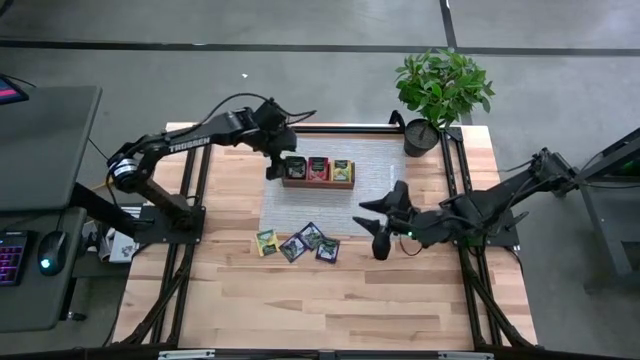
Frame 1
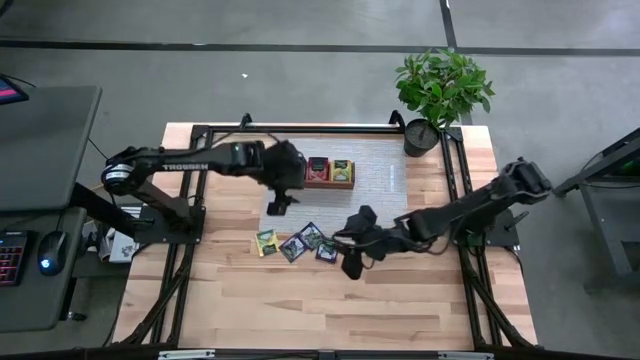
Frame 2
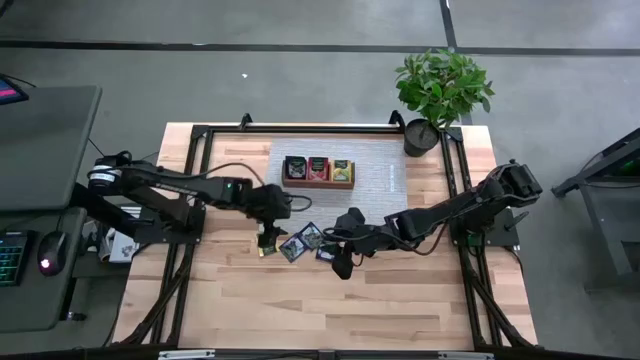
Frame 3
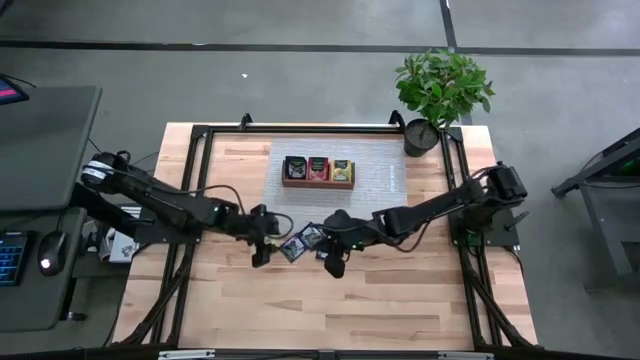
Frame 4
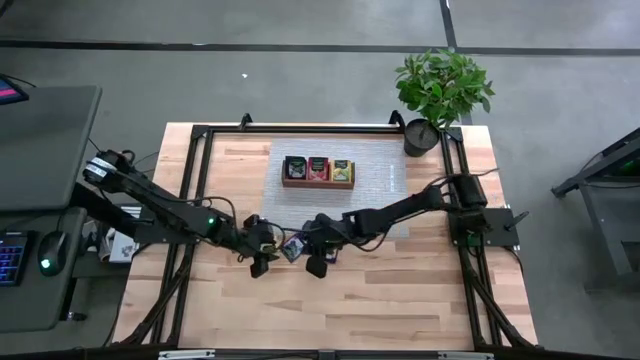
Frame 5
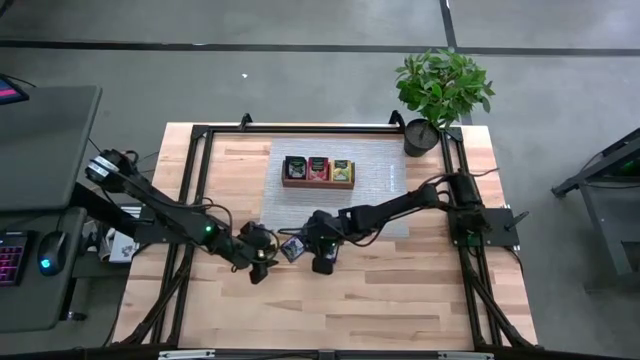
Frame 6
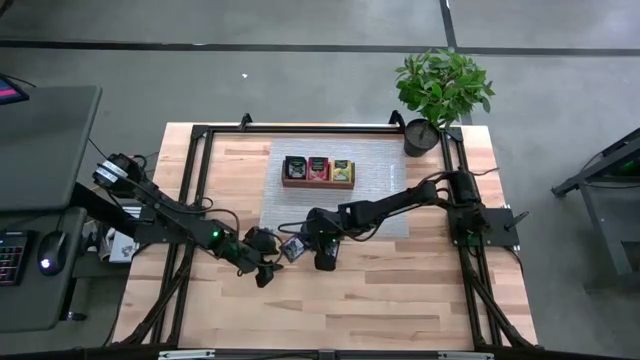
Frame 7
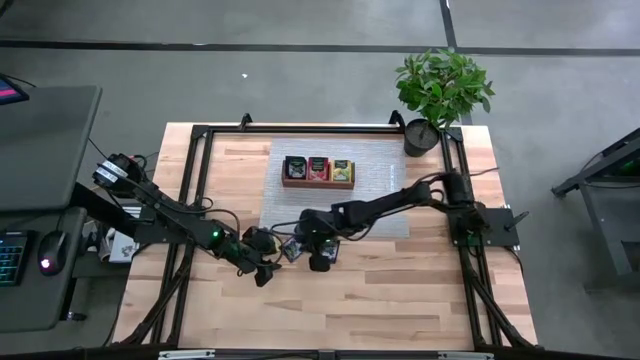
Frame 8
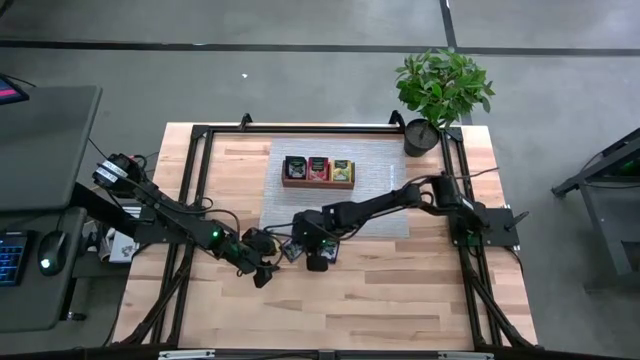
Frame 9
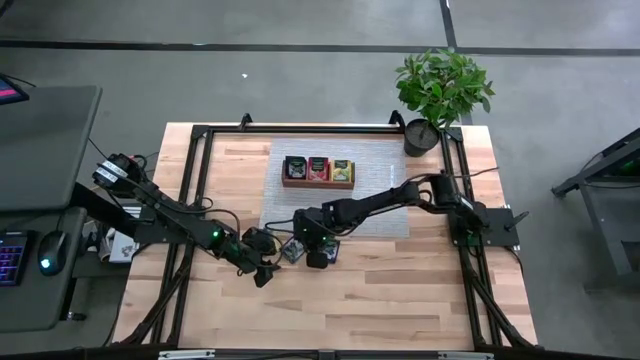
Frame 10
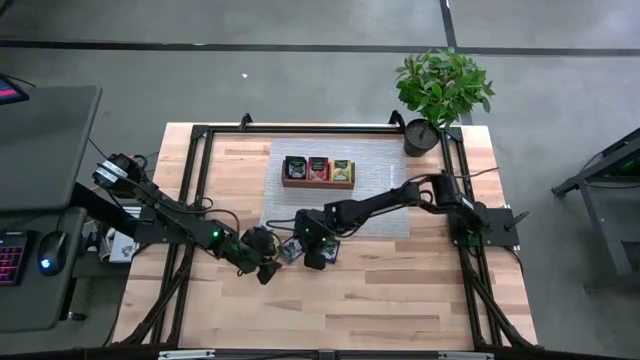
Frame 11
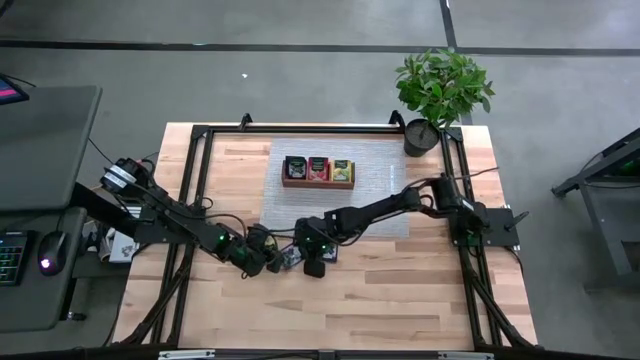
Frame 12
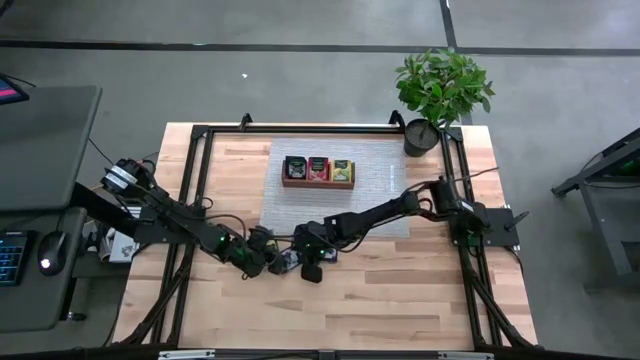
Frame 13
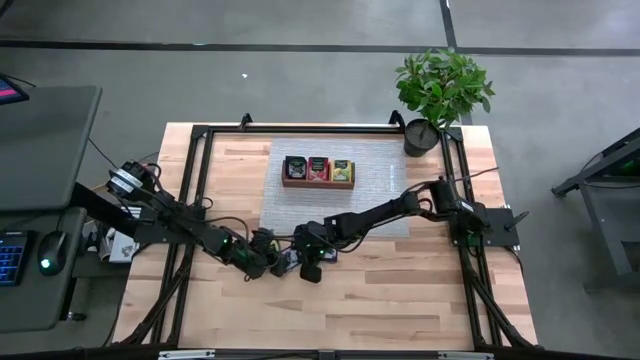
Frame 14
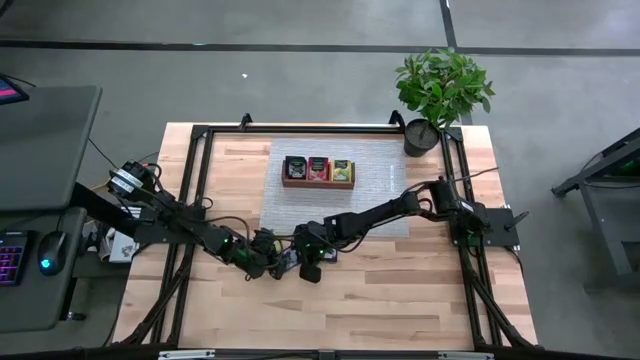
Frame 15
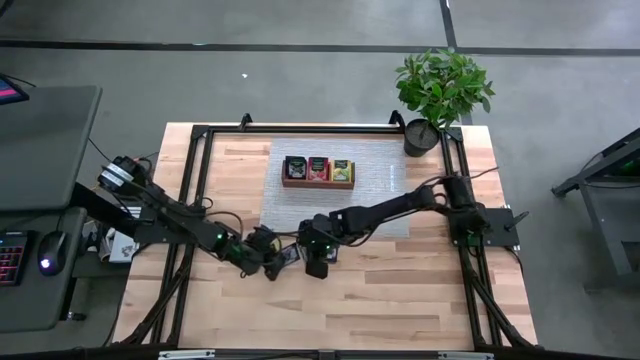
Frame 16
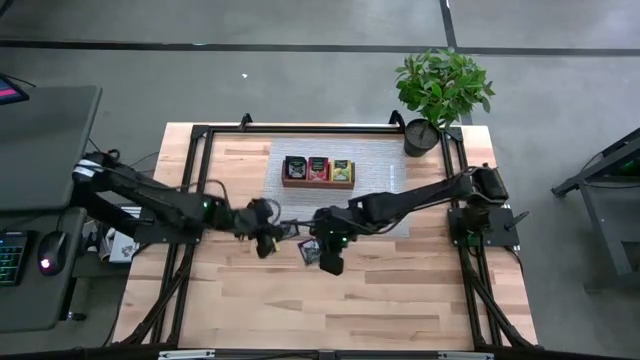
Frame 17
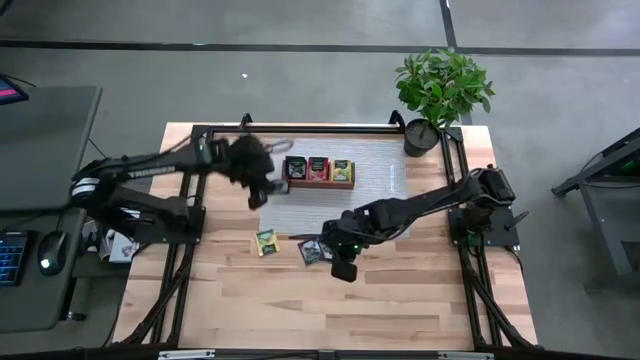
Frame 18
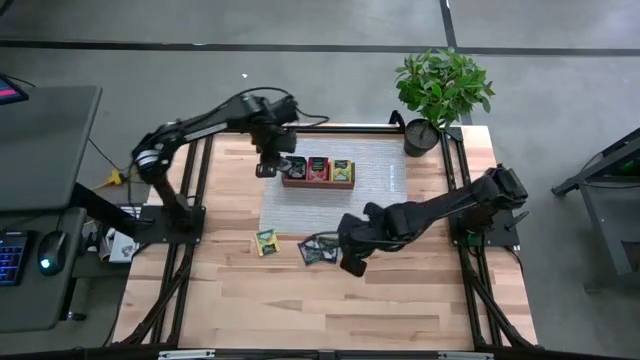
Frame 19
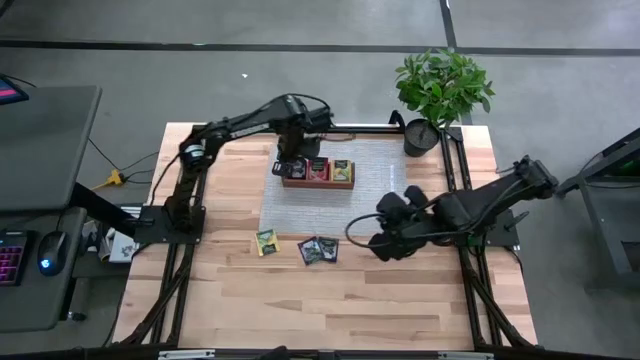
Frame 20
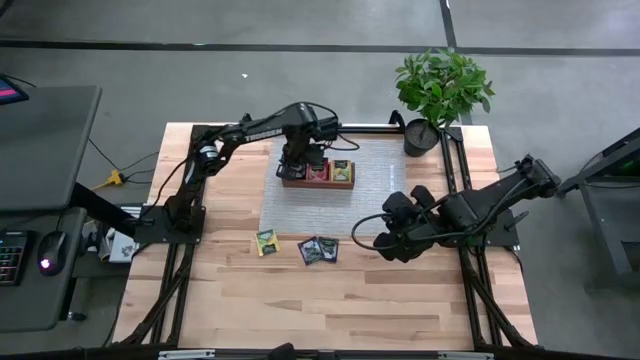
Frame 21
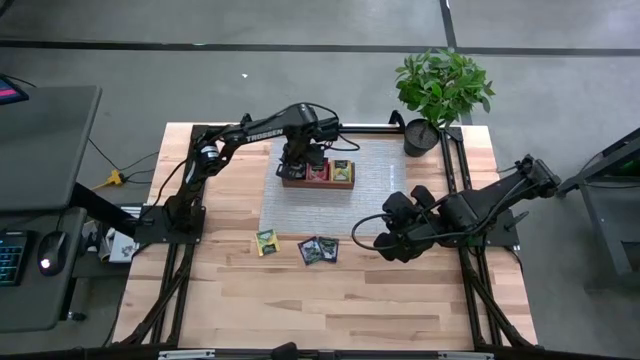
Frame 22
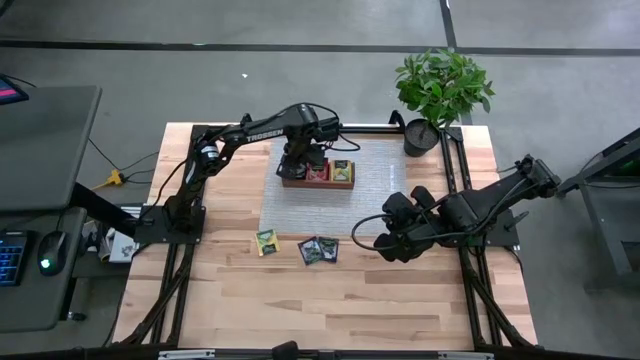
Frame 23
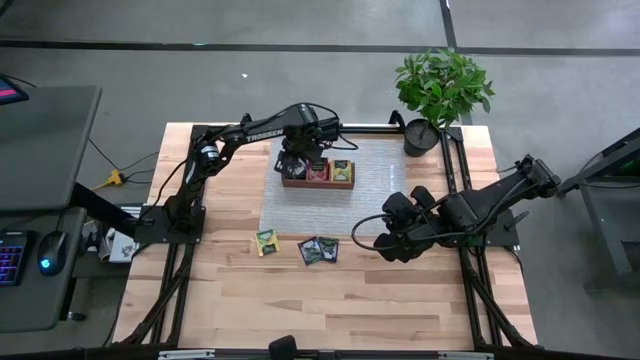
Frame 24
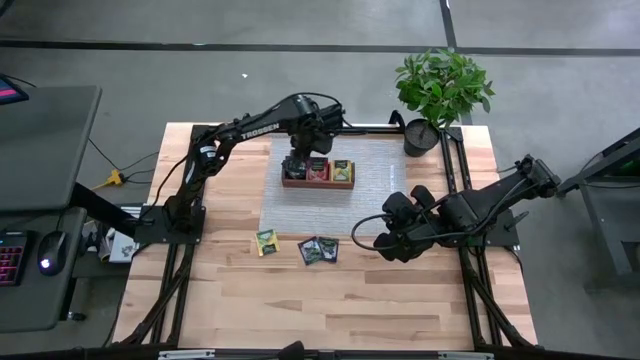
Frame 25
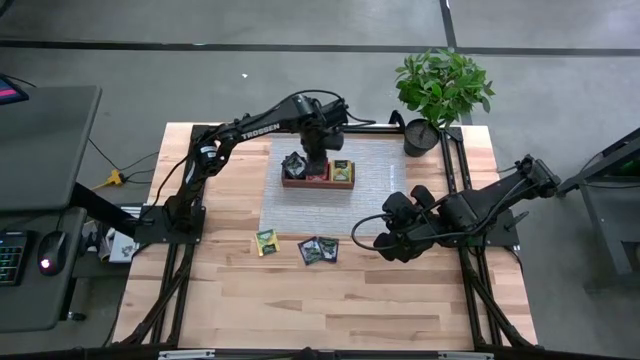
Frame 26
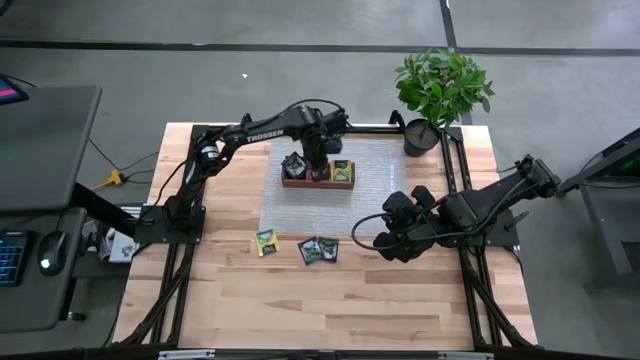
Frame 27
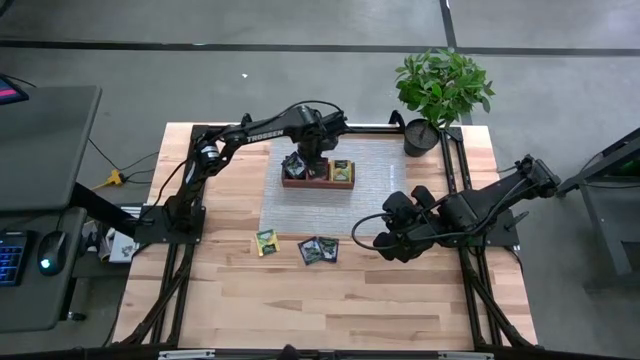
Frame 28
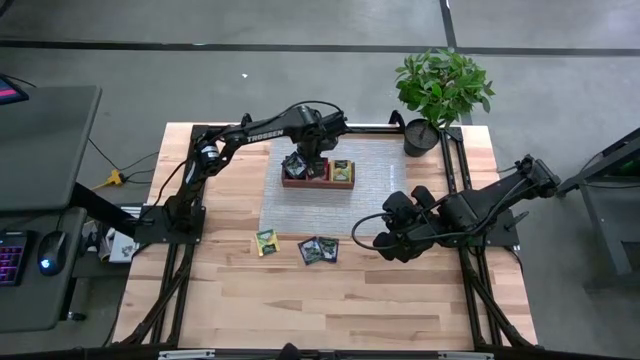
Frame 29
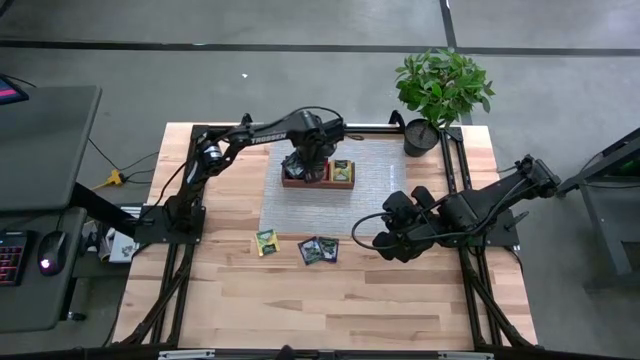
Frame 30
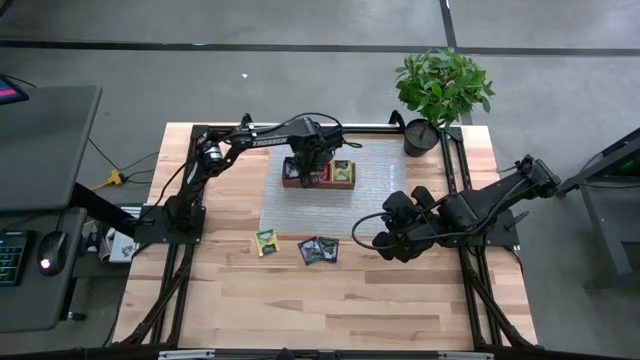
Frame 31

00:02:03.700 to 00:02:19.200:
Task: Pick & Place Tea
Put the purple tea bag into the left section of the wooden organizer

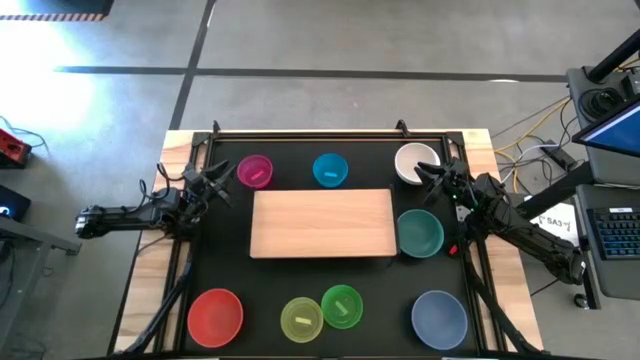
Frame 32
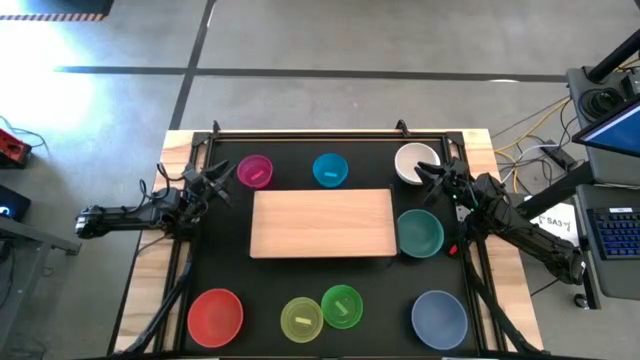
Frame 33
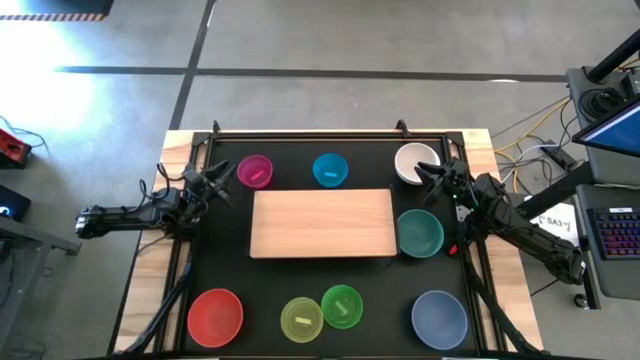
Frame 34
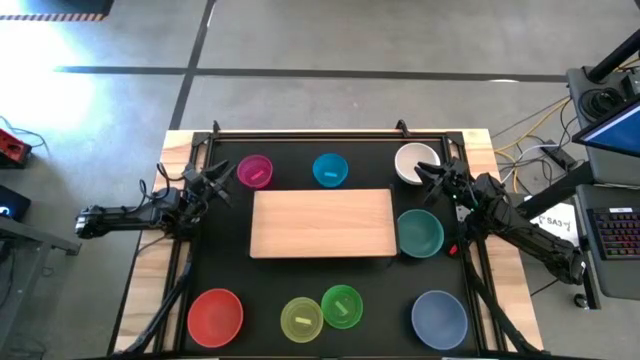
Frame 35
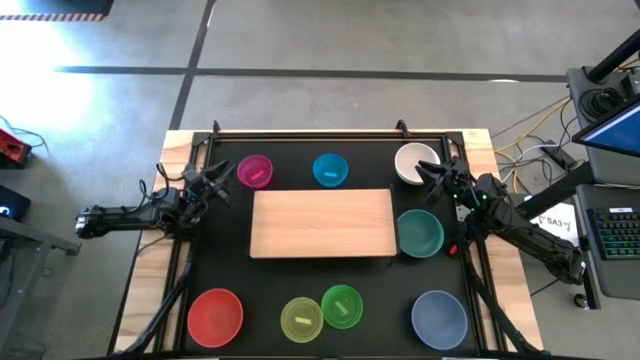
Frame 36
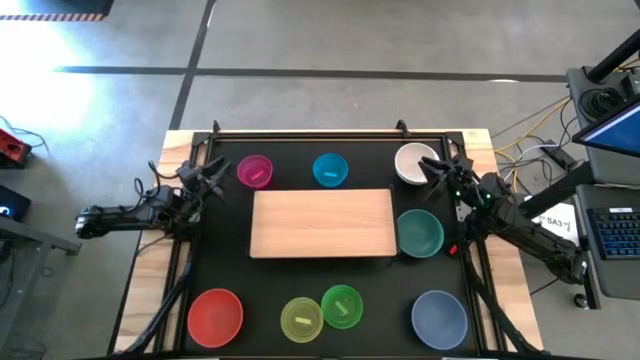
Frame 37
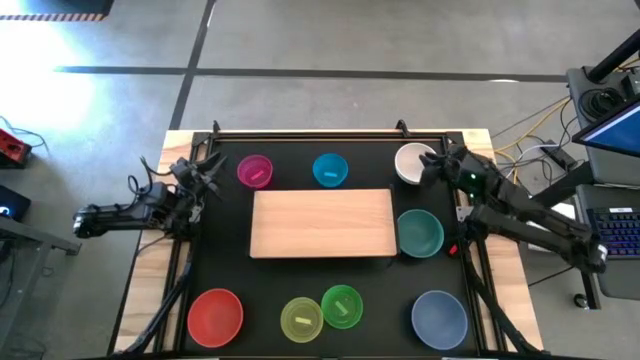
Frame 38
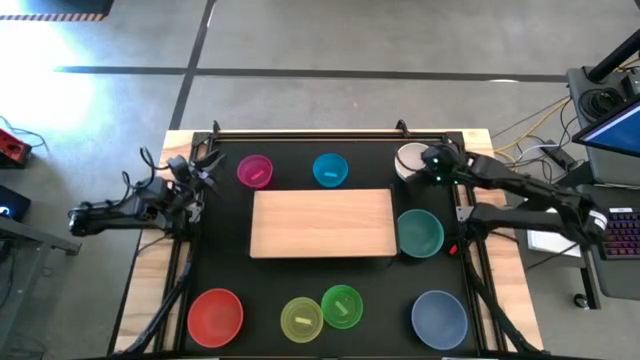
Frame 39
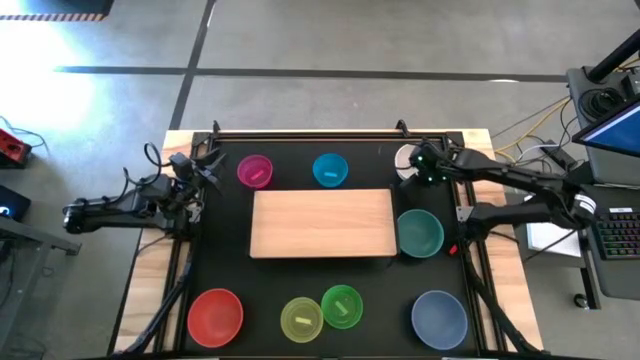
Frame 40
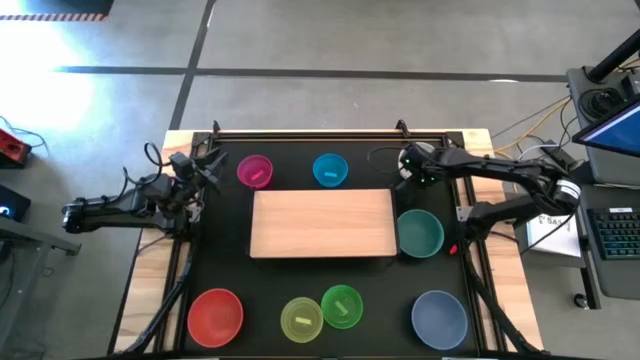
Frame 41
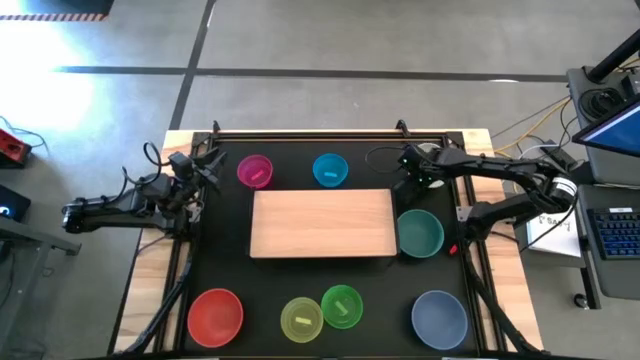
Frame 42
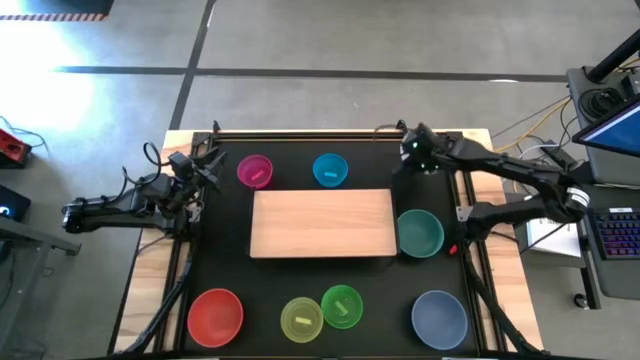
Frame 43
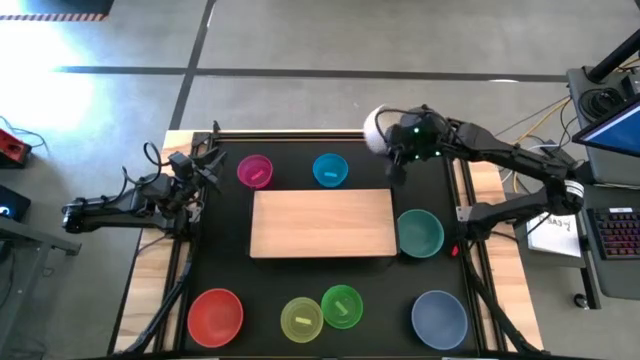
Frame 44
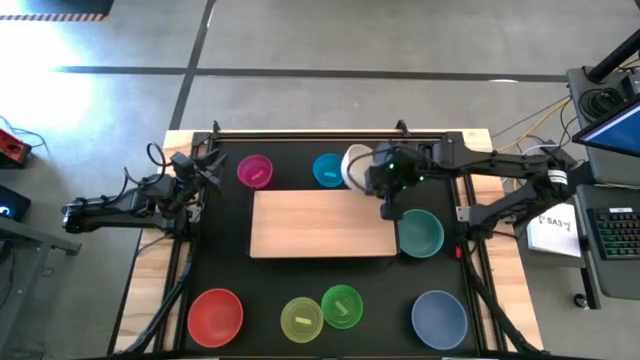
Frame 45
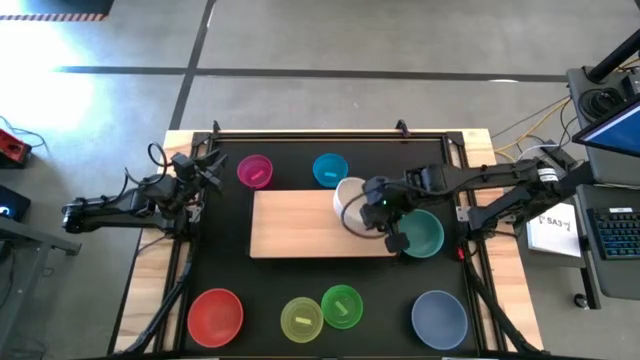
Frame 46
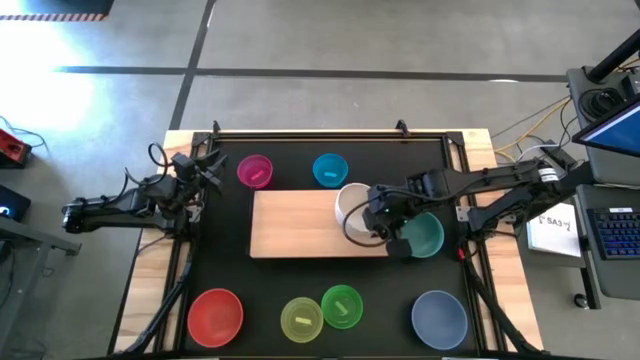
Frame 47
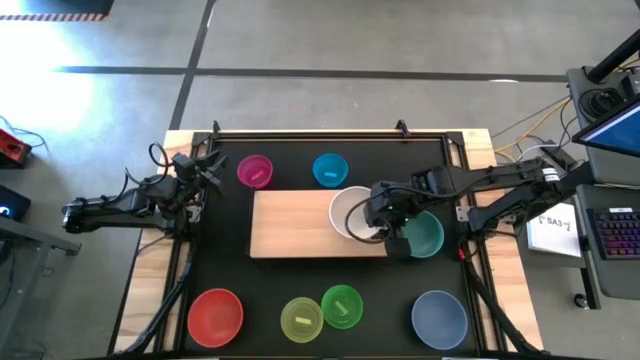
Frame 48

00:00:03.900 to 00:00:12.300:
Task: Place and stack bowls onto a shelf
Put the large white bowl on the shelf
